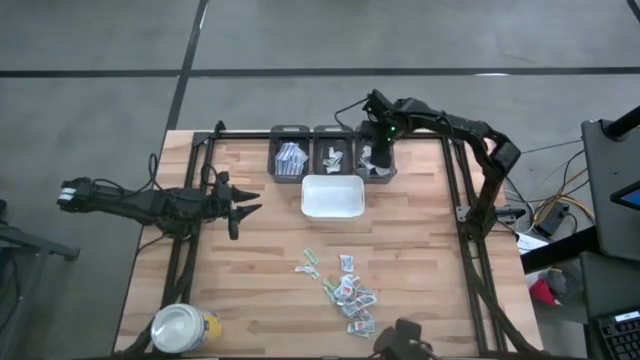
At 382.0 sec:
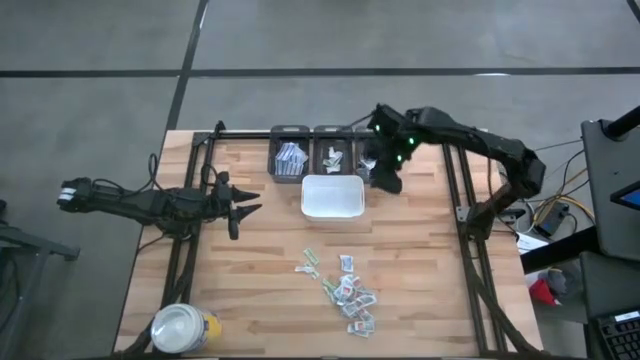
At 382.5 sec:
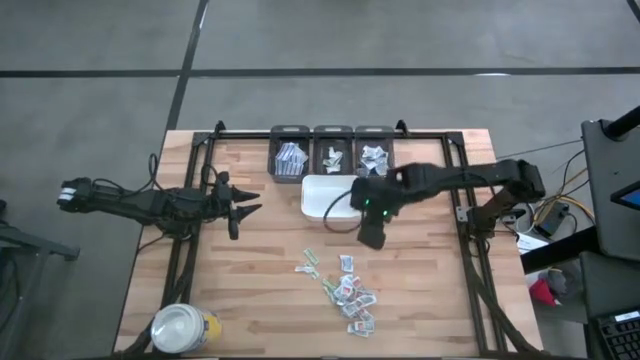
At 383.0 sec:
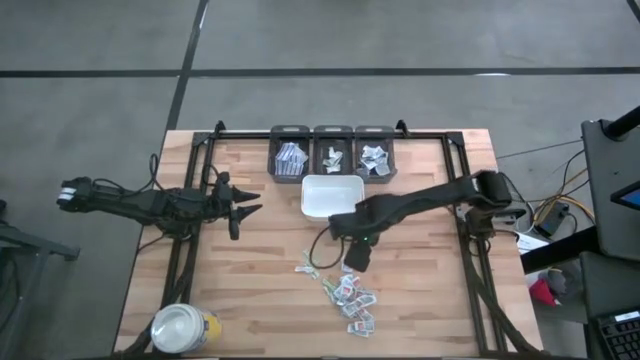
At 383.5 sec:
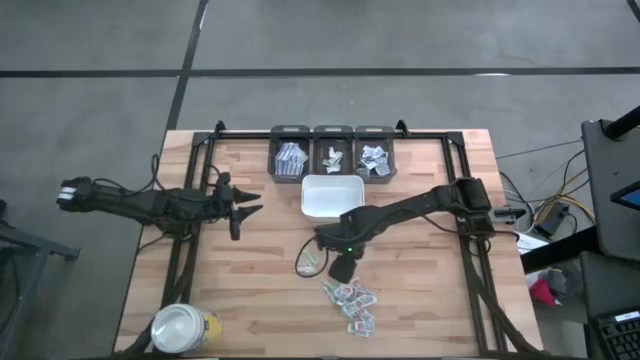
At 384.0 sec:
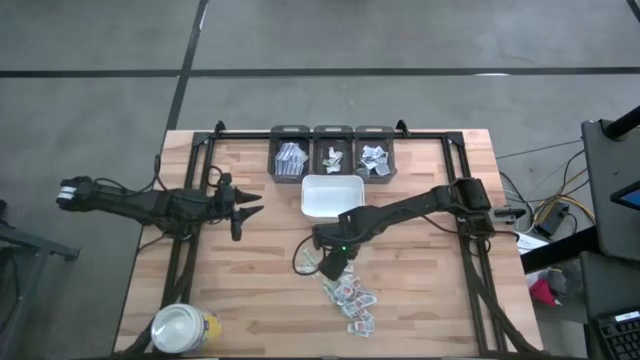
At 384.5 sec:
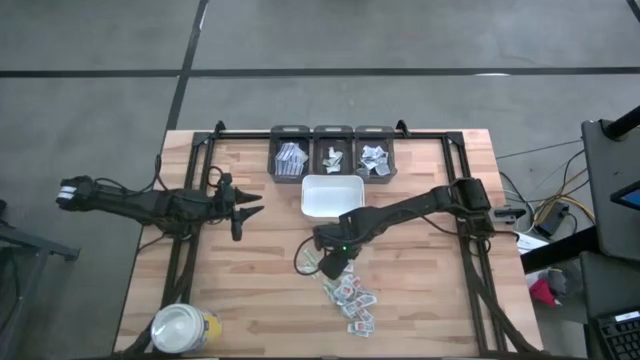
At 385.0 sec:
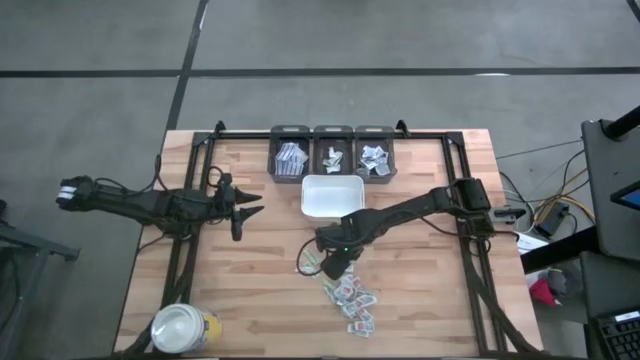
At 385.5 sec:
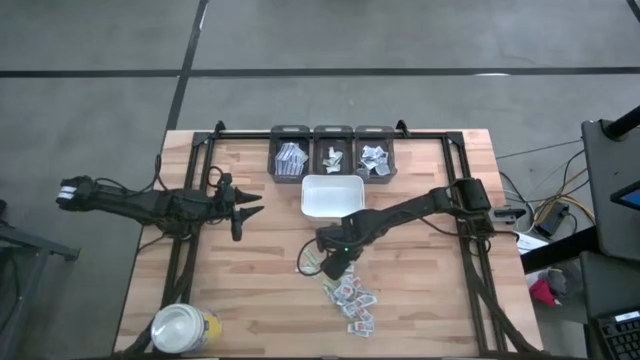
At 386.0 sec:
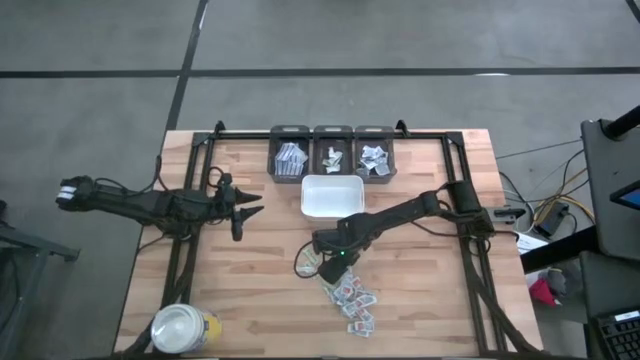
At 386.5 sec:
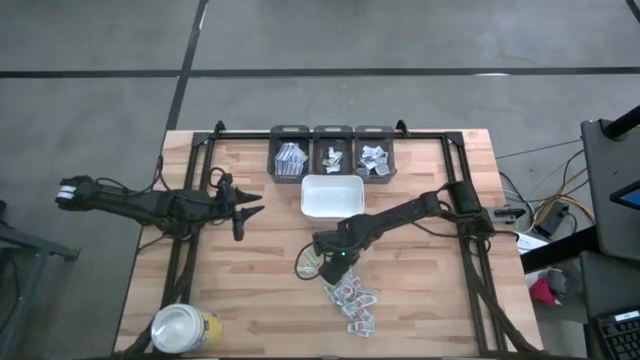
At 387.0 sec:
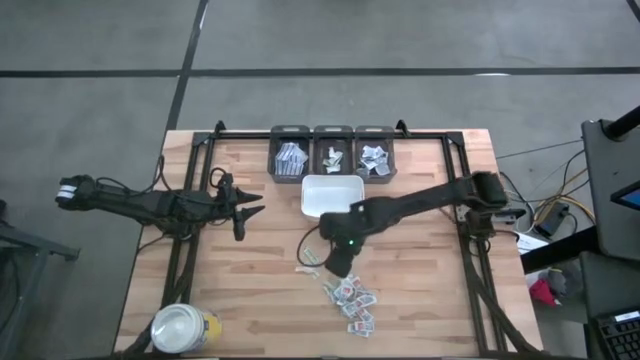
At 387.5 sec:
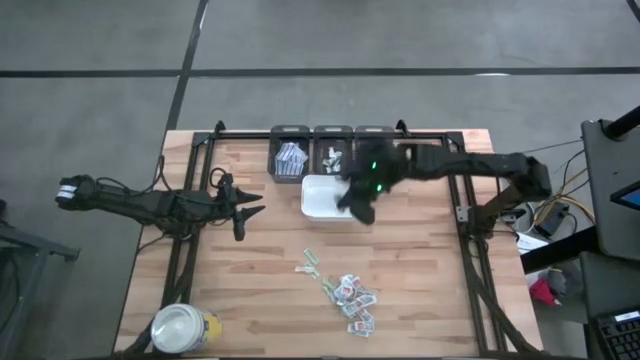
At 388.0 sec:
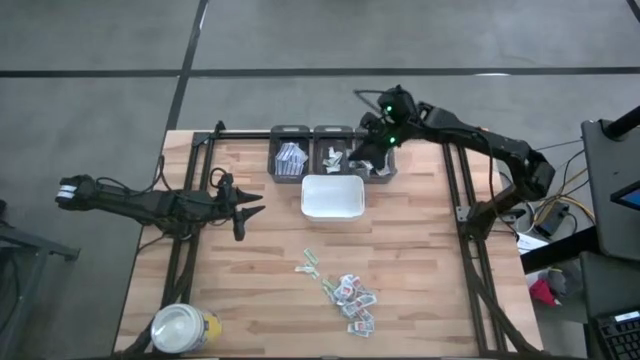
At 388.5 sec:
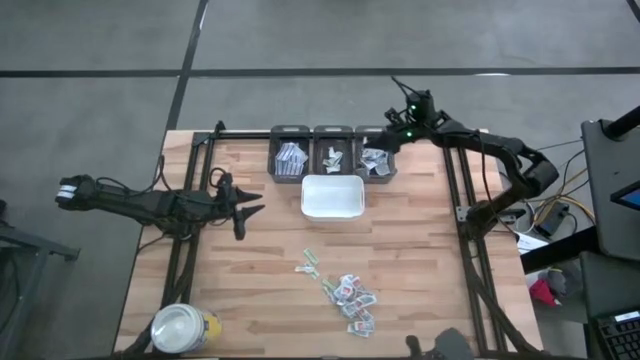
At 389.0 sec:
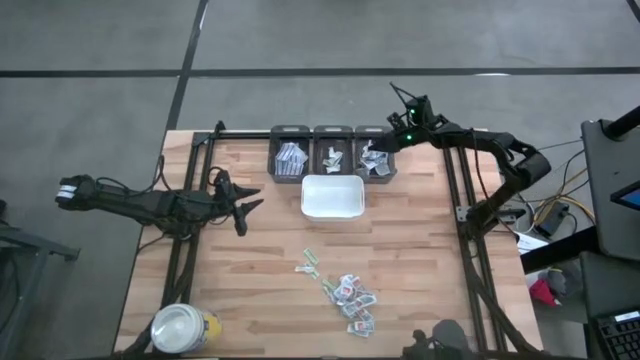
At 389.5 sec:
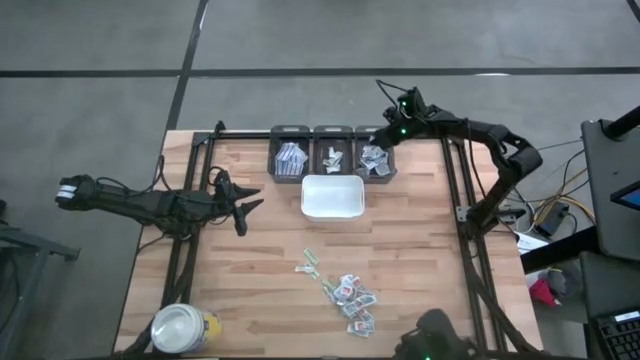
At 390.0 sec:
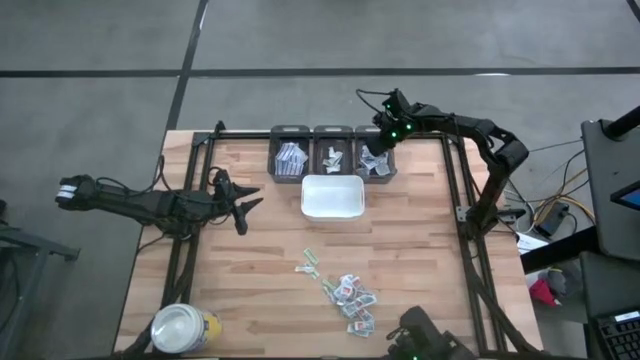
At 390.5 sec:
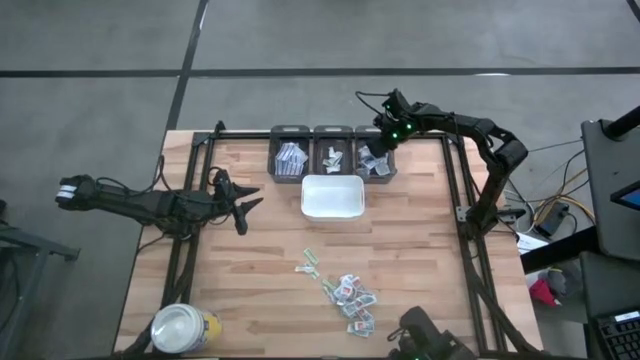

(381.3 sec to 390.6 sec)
Task: Pick & Place First Aid Supplies
Put the white alcohol pad into the right black bin

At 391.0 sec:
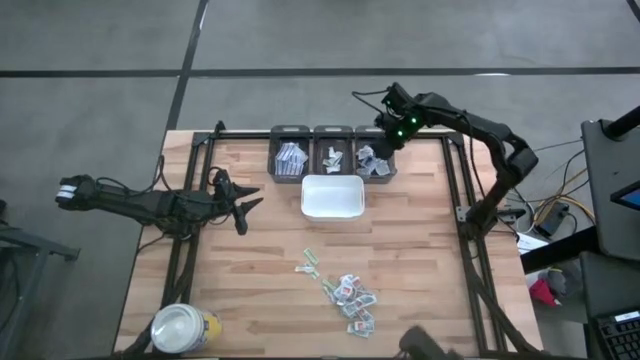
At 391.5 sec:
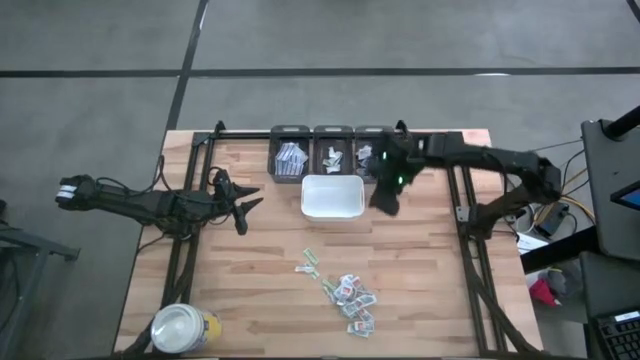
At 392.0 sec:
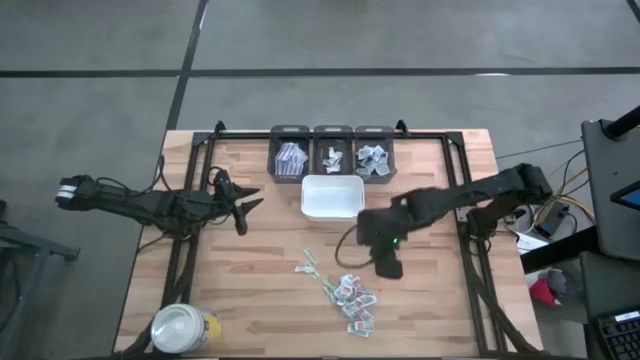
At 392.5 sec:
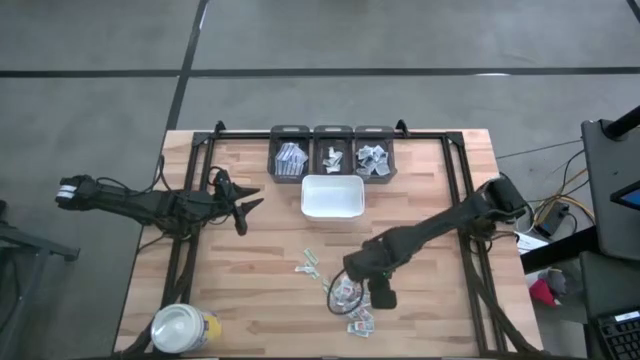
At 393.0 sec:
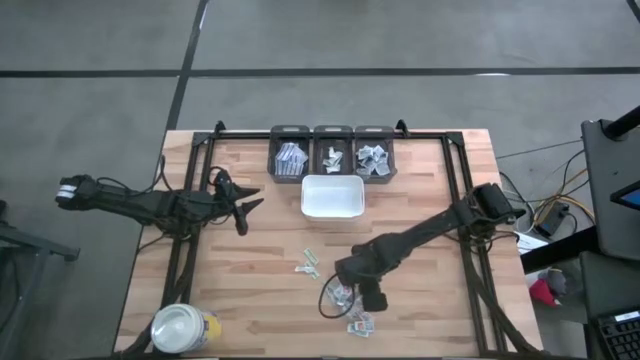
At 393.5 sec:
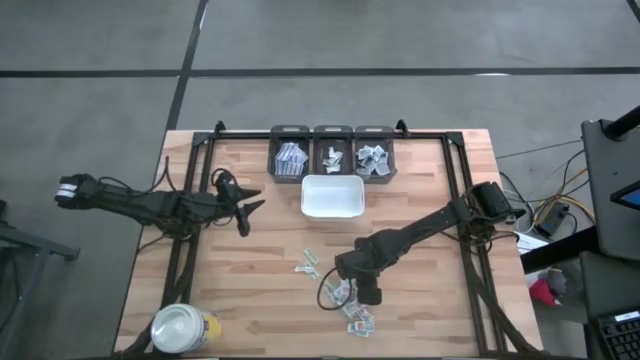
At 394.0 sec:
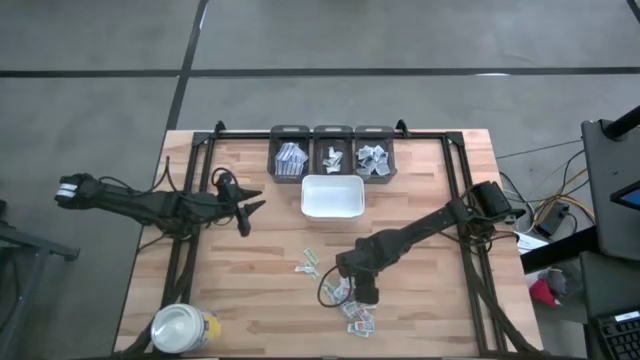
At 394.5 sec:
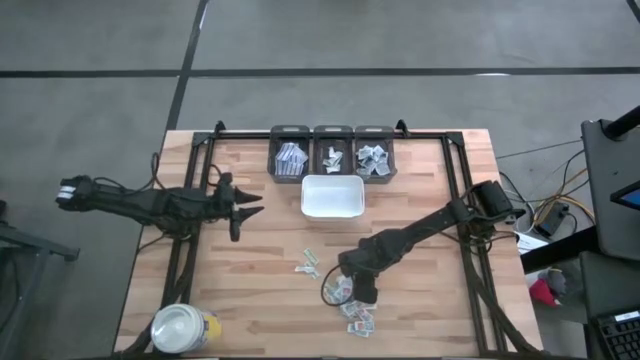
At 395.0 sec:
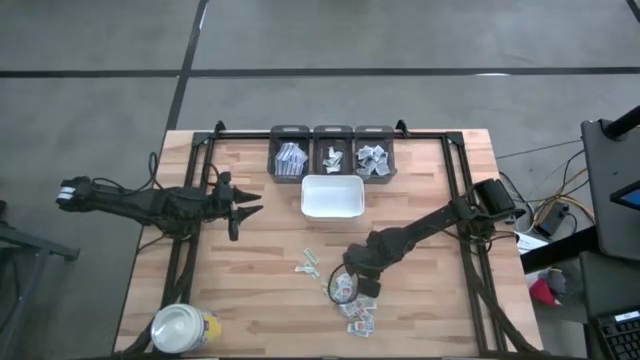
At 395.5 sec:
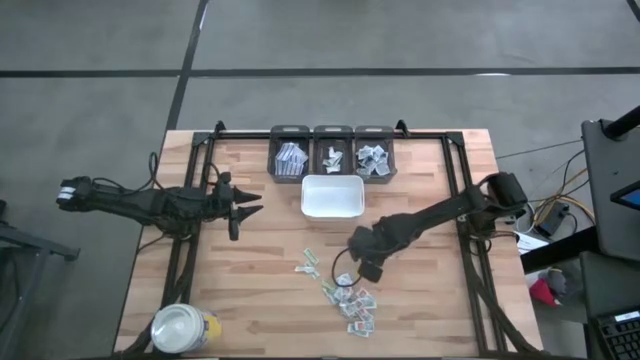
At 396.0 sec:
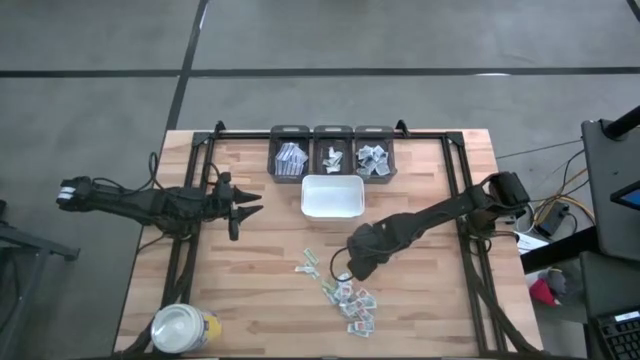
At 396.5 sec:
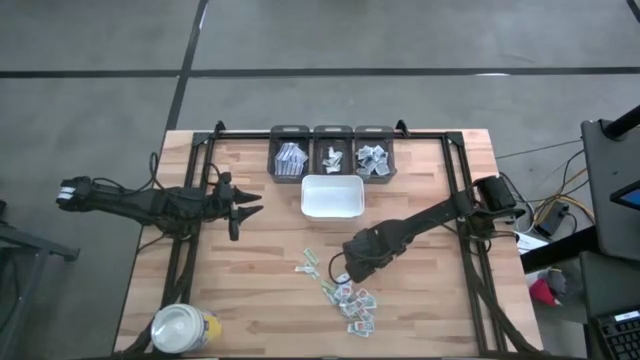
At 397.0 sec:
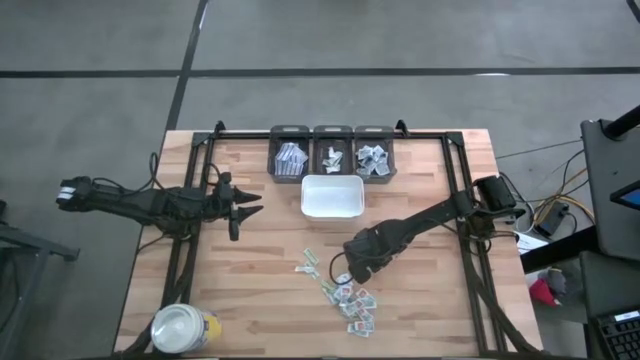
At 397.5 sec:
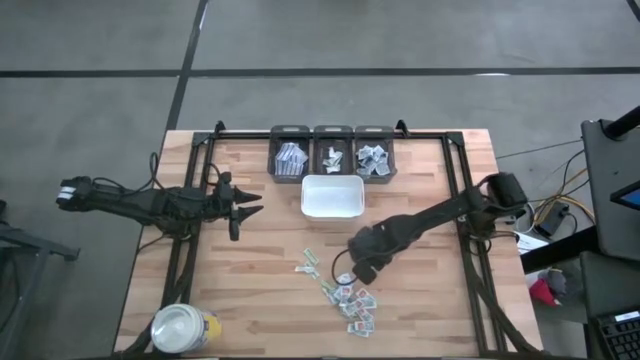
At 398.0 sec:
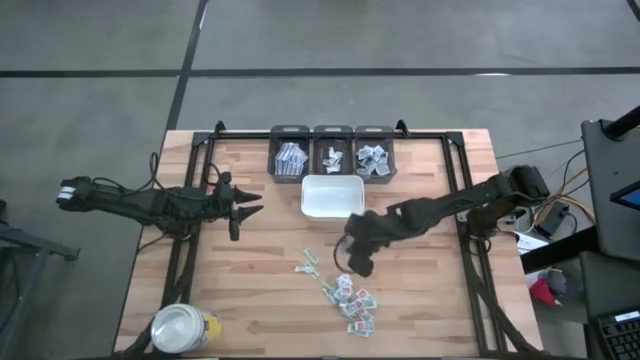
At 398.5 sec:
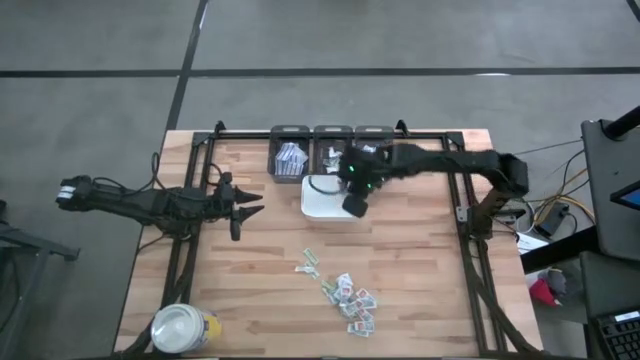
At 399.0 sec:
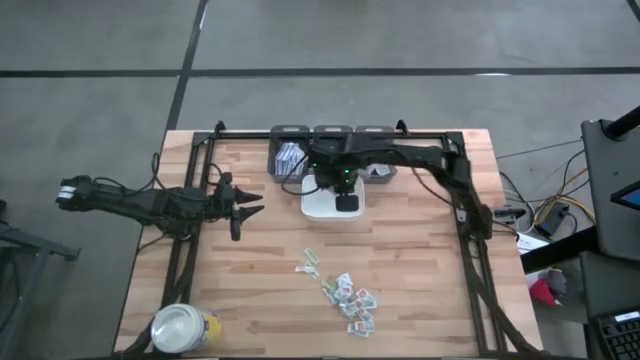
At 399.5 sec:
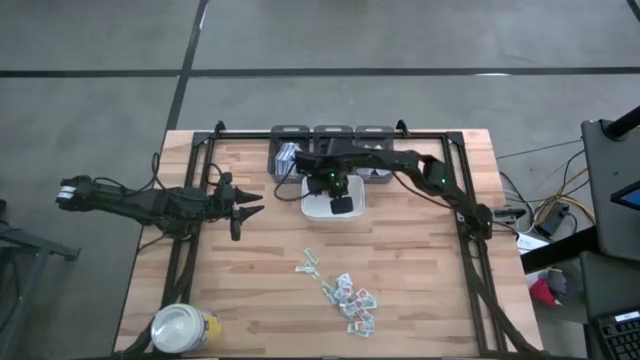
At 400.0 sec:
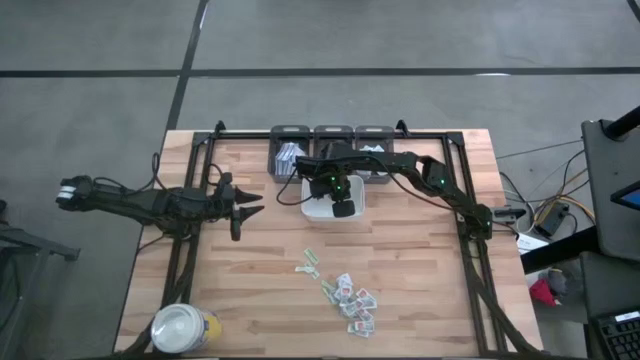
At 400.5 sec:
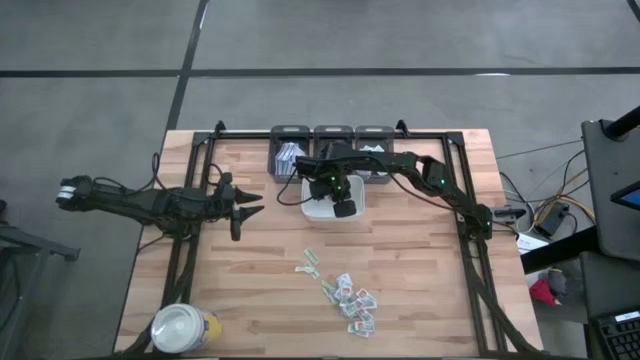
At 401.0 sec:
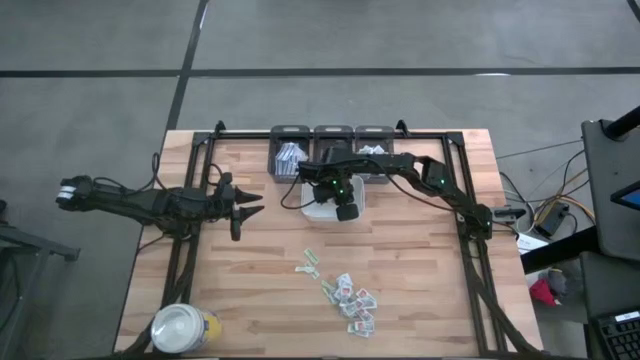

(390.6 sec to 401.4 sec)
Put the orange ointment pack into the white bin
